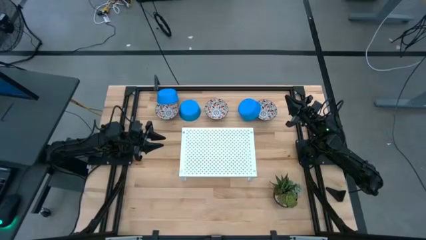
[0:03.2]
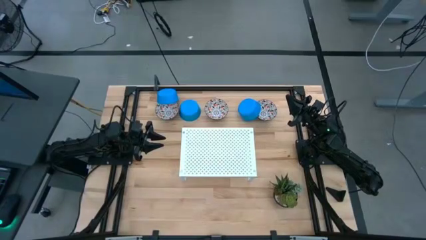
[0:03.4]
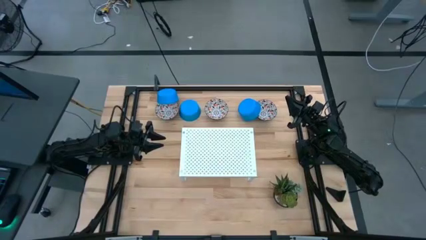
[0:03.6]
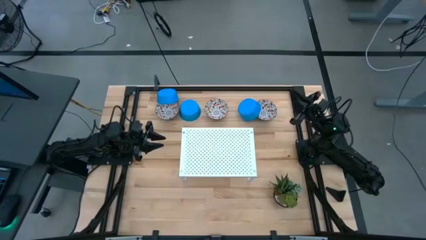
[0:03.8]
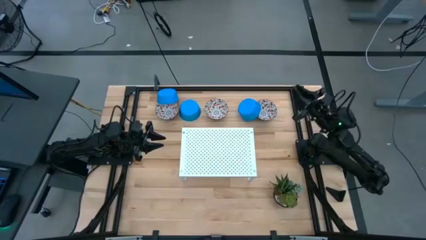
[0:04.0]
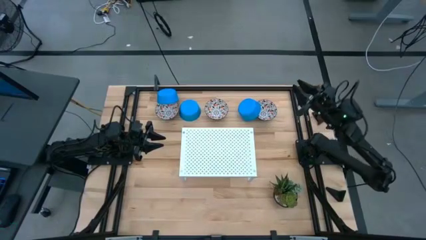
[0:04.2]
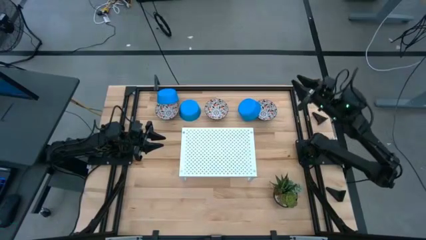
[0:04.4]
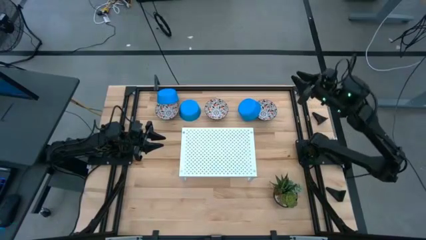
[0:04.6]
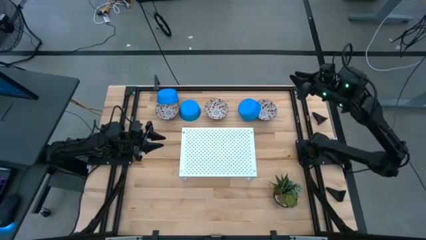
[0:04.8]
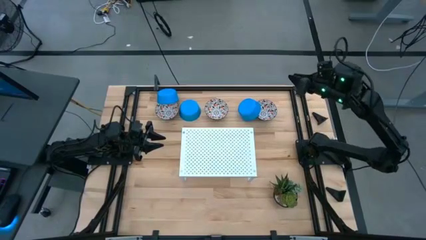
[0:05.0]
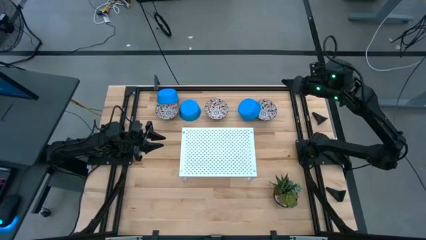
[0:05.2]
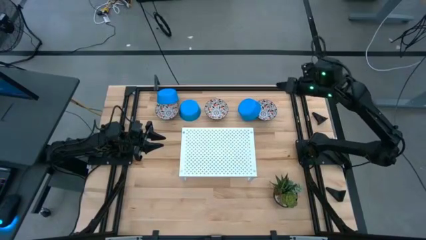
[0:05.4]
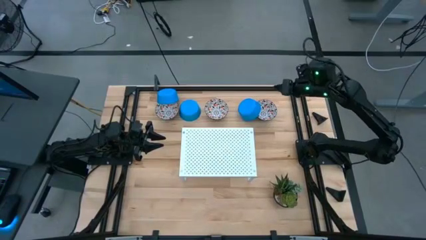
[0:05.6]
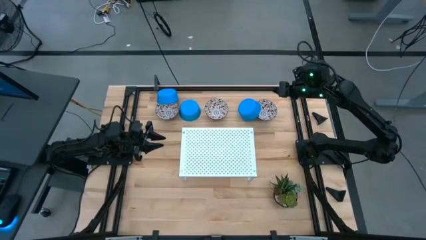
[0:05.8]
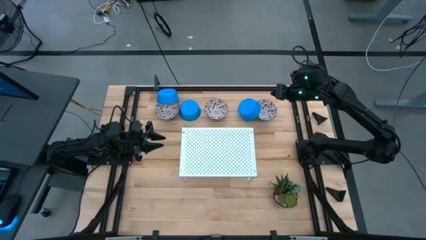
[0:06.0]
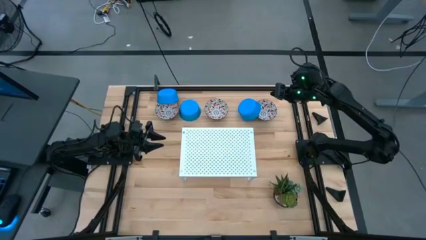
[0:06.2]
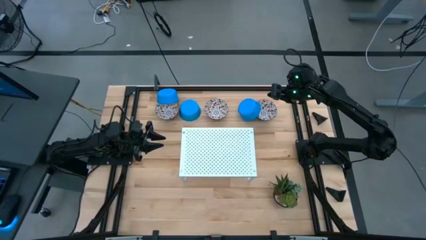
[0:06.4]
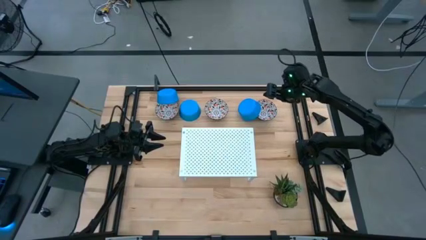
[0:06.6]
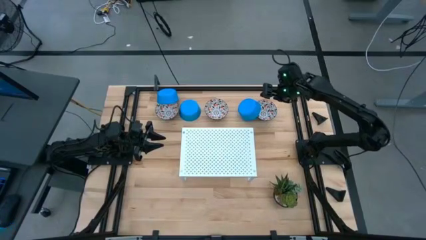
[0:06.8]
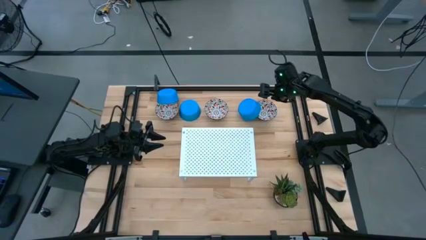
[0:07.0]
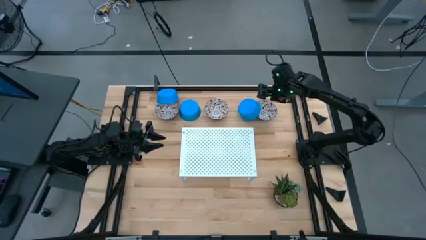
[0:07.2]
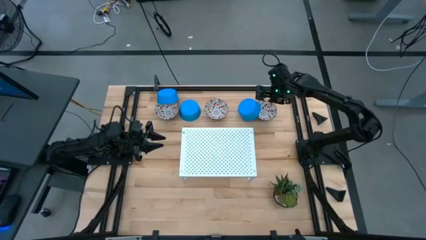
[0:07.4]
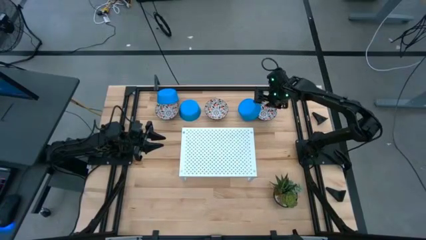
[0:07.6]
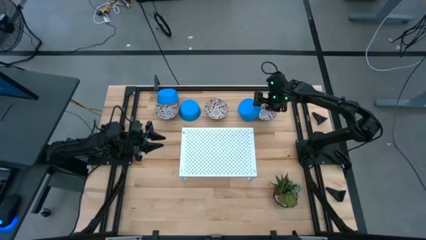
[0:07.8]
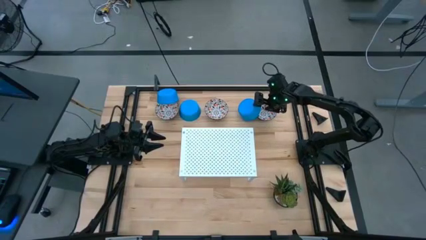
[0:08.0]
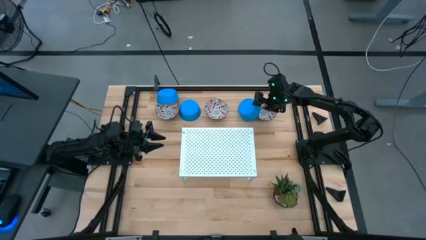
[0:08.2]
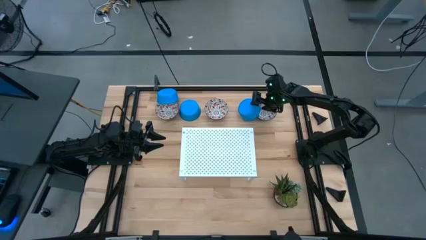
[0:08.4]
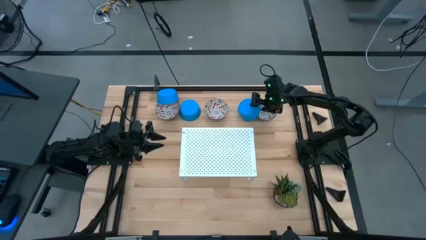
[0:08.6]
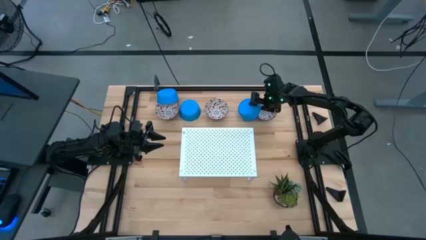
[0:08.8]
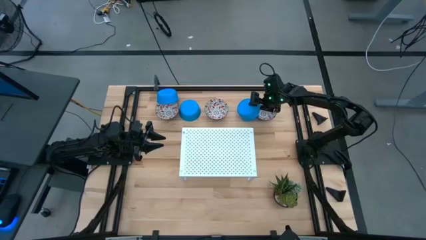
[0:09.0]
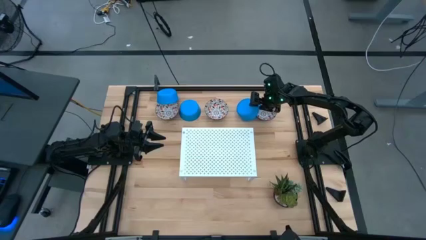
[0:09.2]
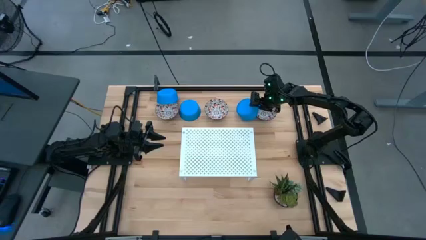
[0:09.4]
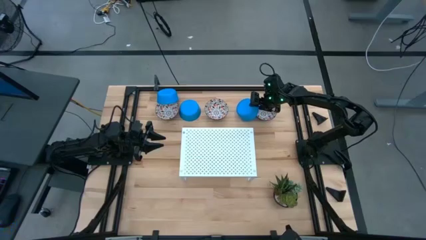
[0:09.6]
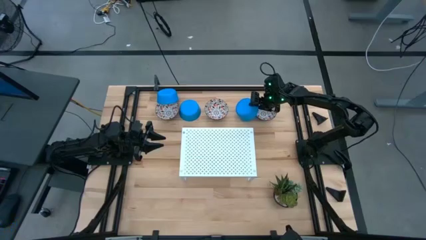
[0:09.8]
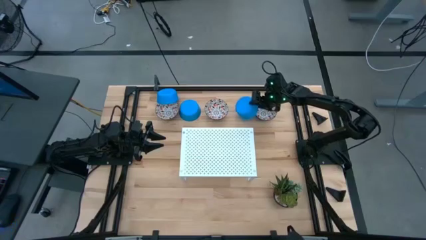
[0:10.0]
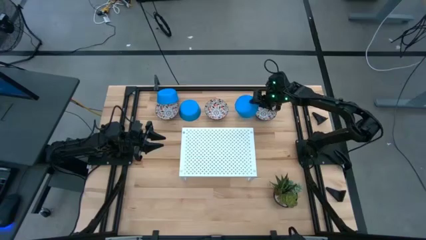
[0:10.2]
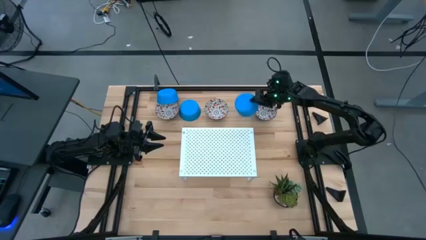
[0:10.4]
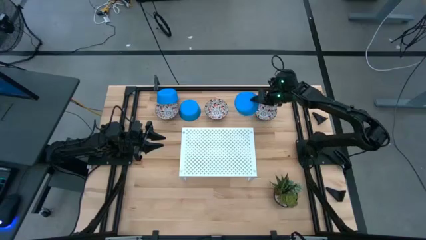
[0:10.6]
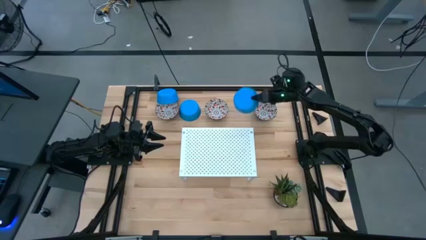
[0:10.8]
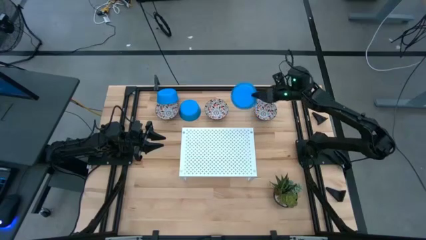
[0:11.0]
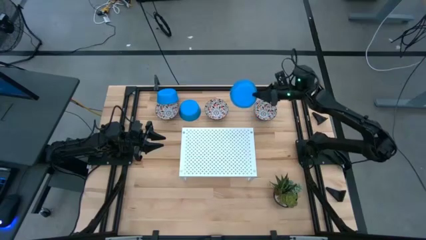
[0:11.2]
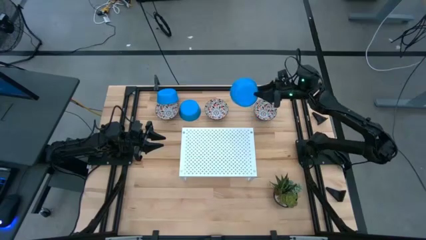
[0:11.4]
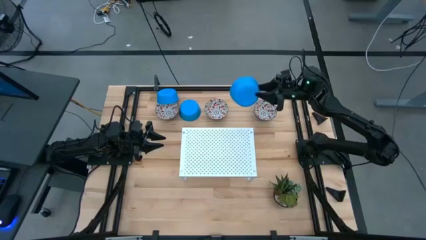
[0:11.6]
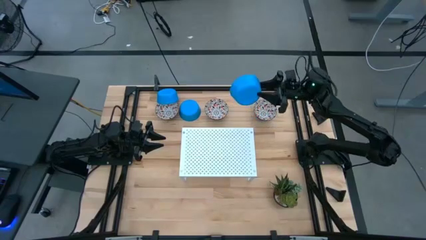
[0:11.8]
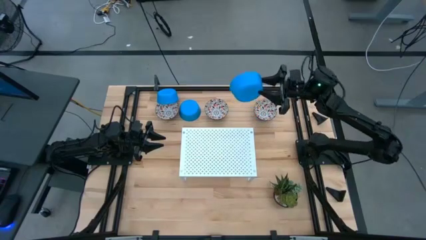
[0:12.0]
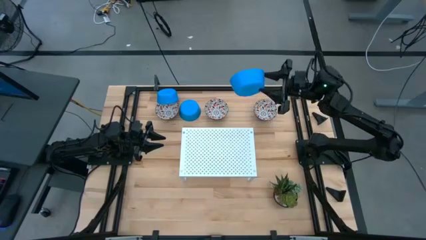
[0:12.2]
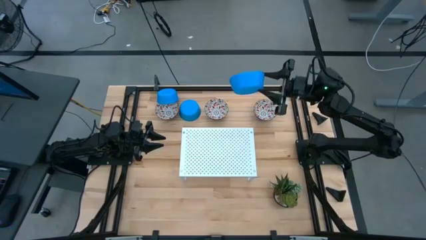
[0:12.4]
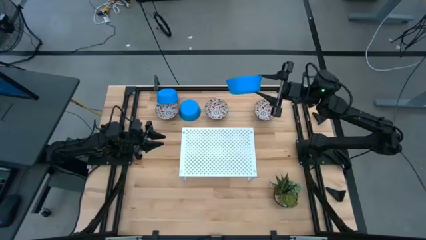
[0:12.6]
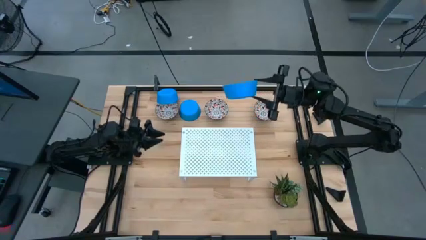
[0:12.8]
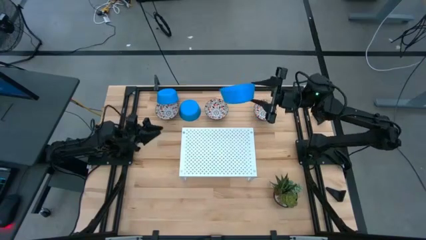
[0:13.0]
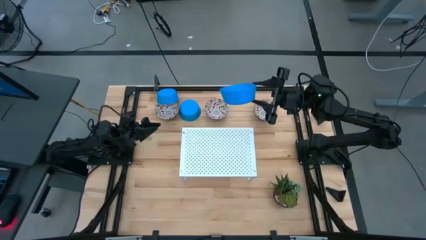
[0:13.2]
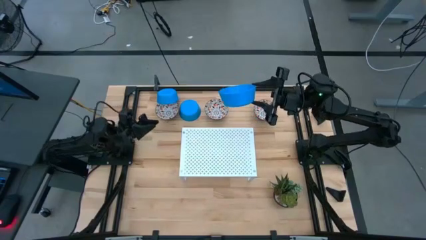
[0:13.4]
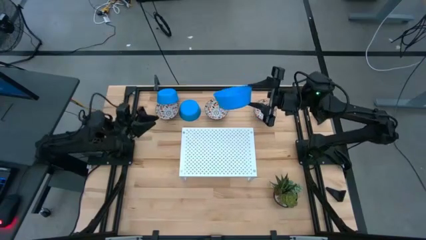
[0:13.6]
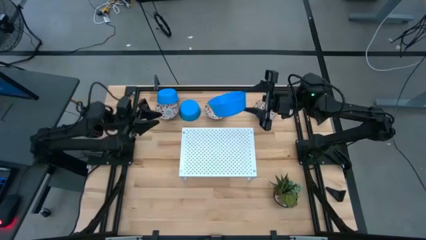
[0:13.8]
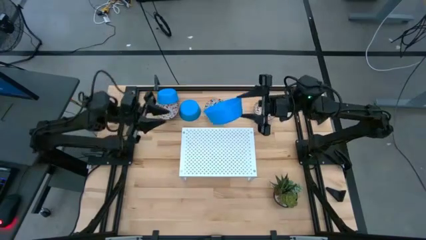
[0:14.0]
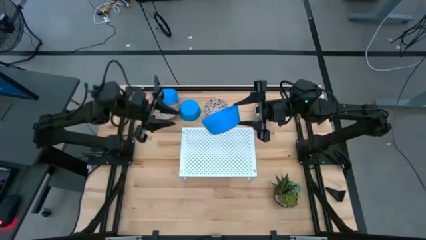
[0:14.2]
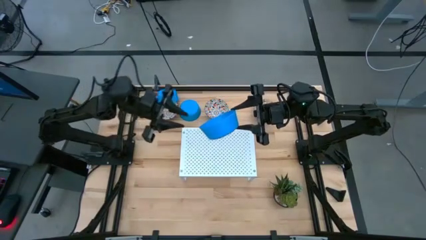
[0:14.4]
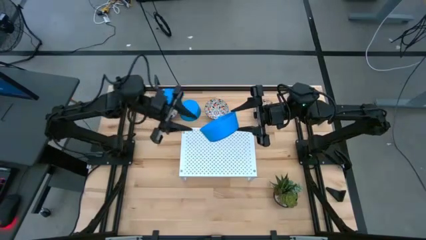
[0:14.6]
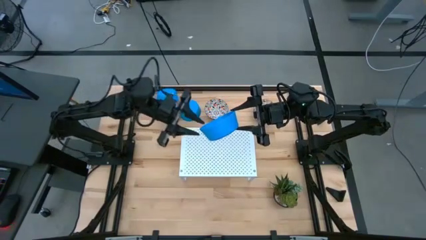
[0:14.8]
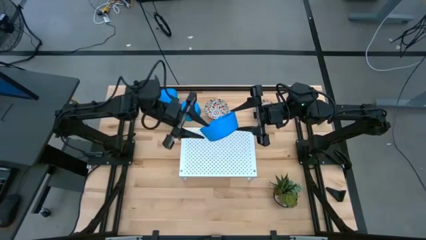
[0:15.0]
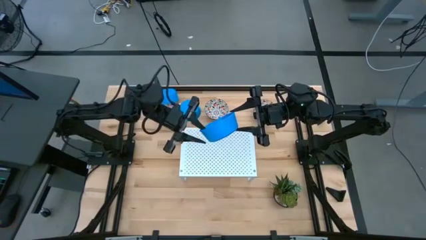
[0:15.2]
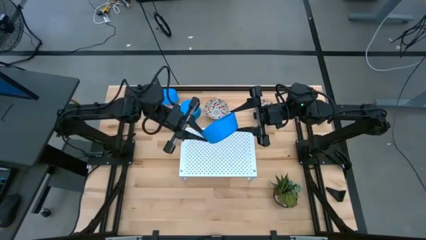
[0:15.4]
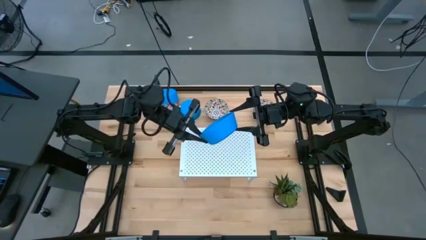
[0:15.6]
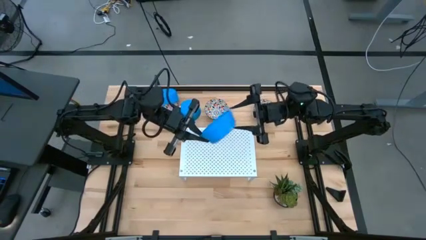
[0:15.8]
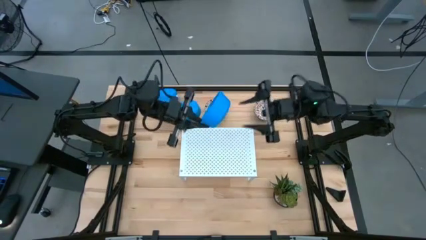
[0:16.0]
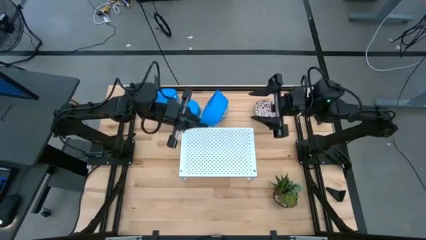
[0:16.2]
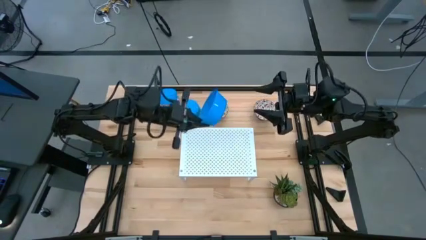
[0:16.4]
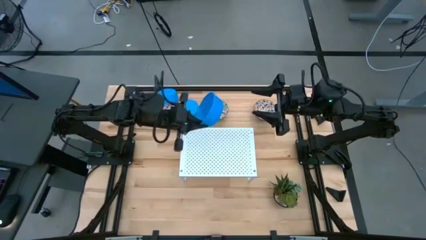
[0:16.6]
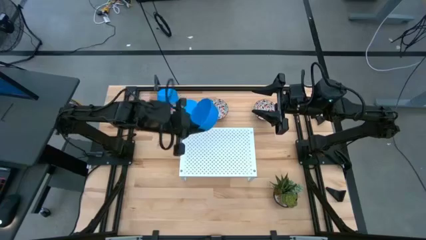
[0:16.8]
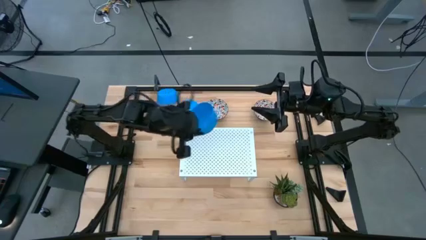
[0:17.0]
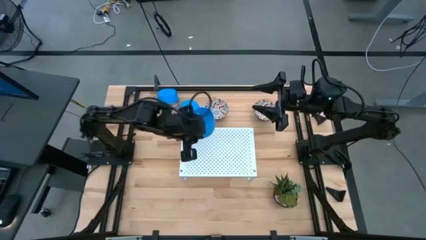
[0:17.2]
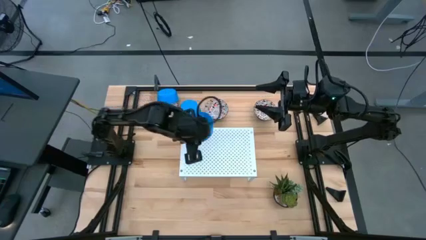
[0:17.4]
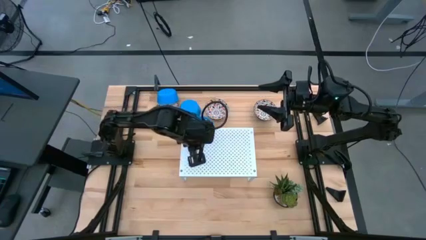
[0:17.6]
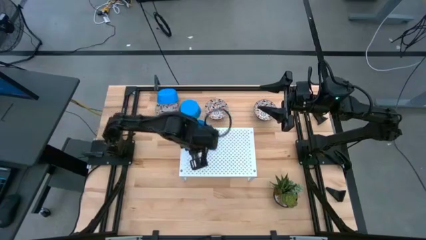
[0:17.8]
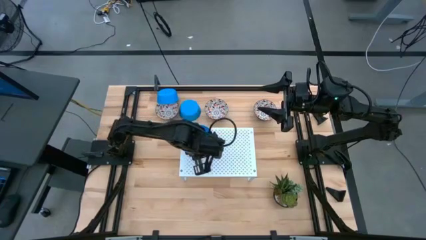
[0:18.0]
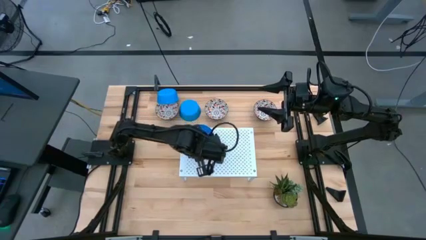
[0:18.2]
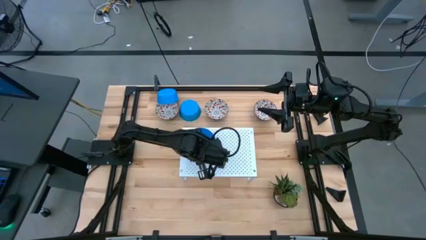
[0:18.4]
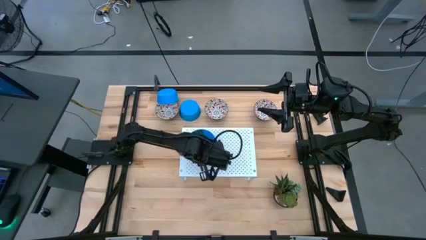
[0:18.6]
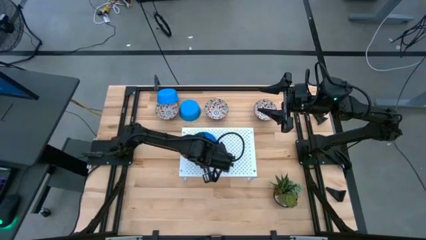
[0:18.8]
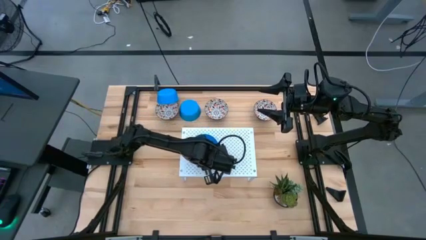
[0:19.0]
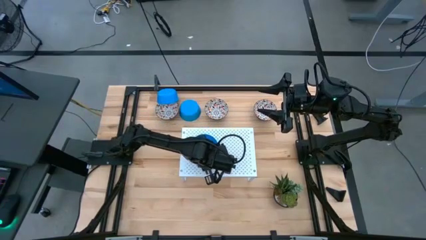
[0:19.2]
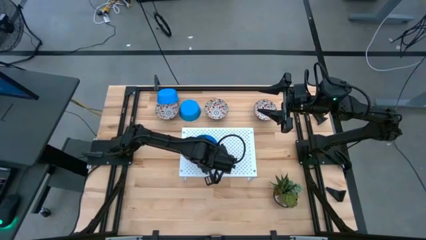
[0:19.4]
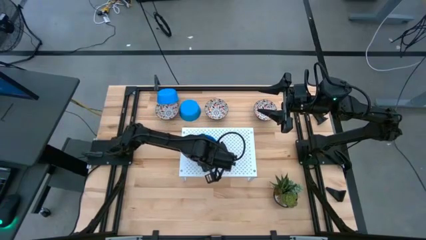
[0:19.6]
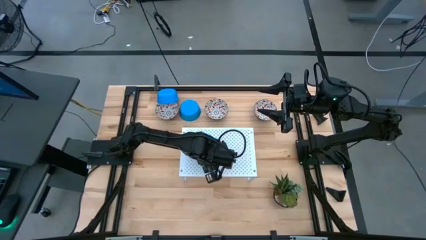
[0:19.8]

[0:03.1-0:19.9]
Task: Pick & Place Mini bowls
Put the right blue bowl on the shelf
